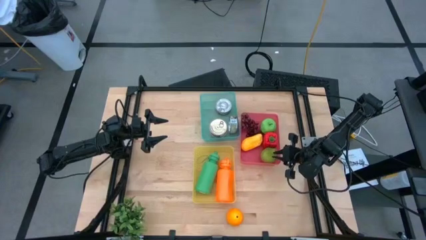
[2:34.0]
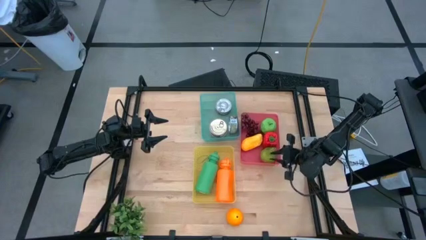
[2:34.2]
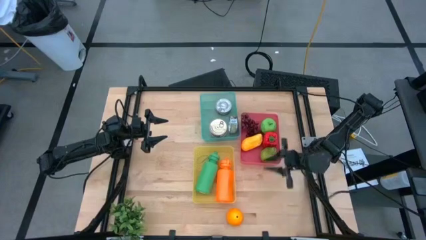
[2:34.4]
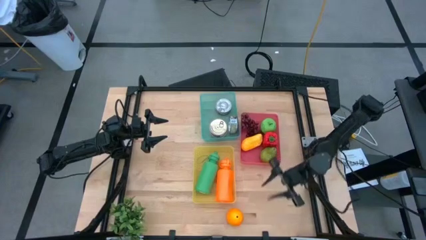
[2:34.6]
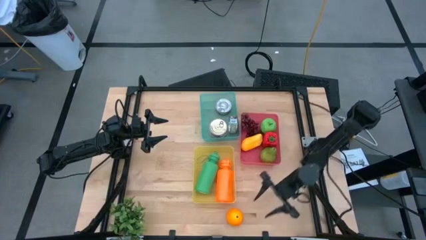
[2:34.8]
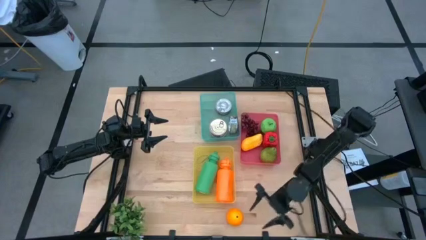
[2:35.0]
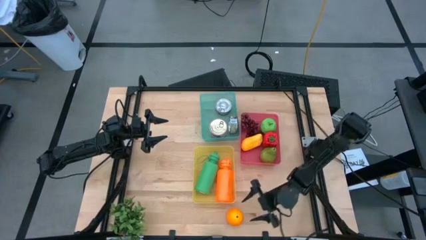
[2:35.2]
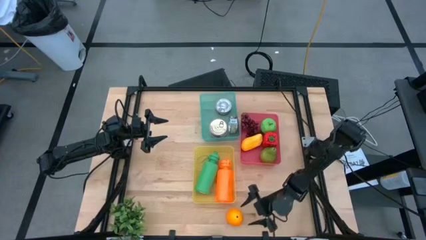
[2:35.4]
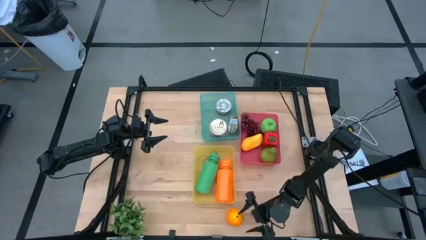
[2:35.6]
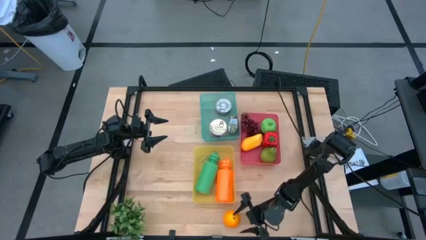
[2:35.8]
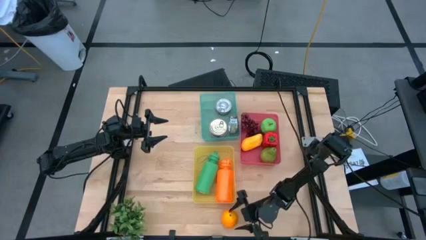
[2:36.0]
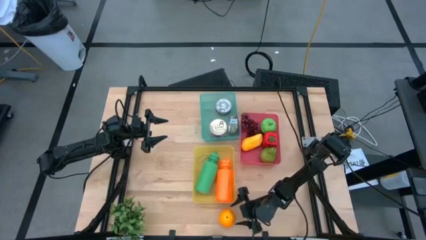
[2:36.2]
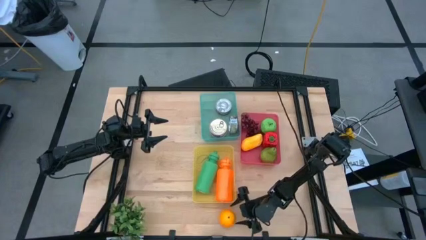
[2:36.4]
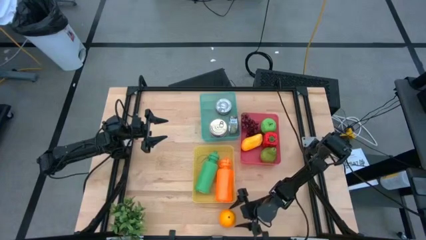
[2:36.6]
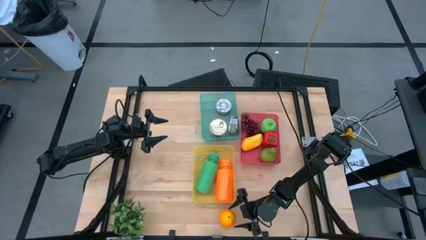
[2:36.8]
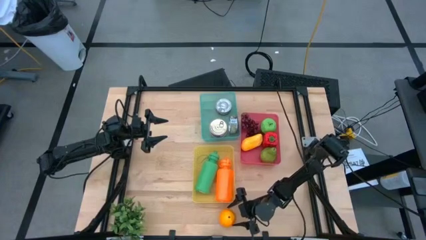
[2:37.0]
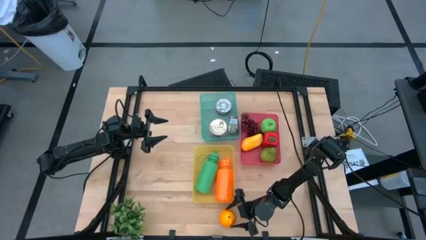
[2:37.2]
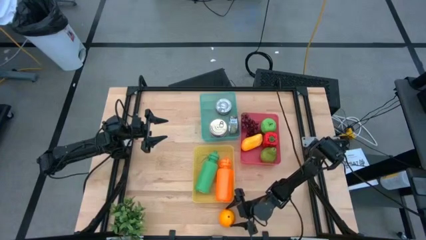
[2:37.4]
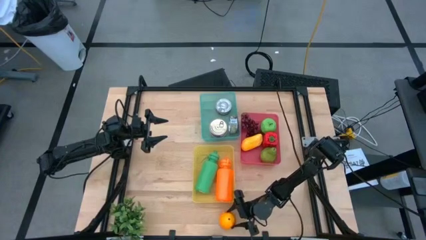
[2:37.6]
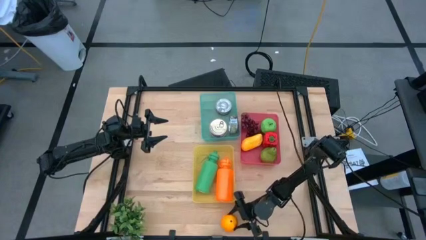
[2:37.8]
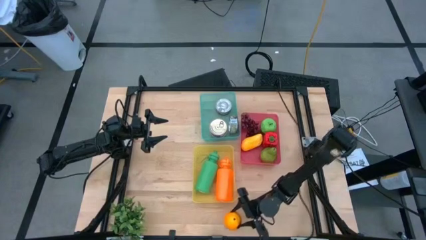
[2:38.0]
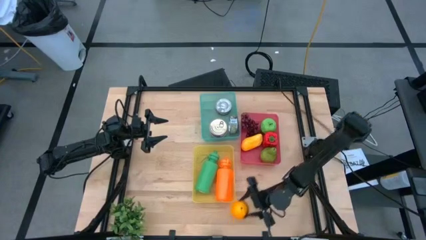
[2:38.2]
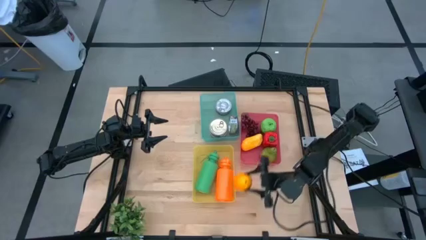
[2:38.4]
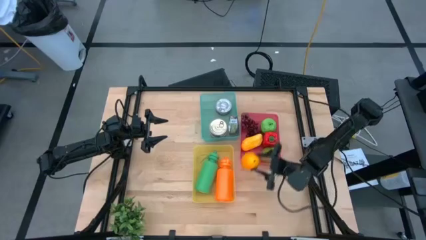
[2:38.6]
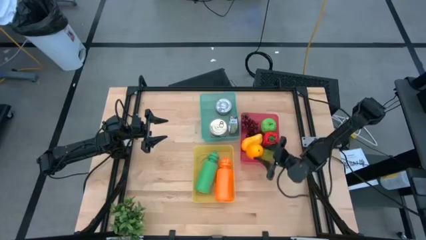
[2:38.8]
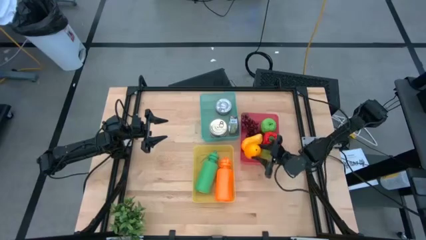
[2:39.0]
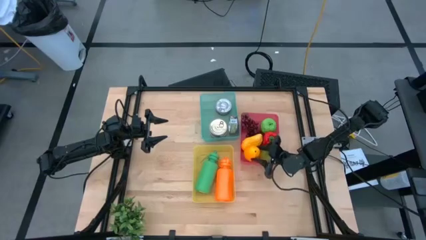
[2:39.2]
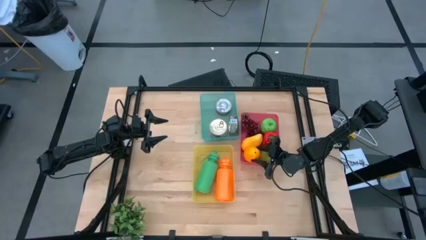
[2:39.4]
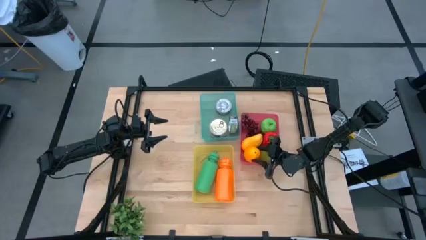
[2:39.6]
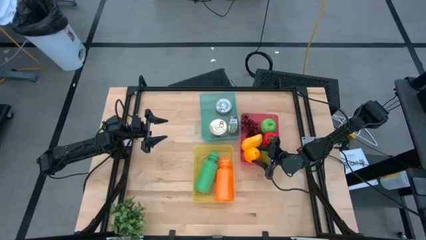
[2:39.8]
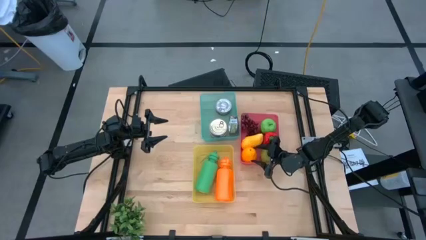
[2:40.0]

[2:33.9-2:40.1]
Task: Pick & Place Food Item
Put the orange into the red bin

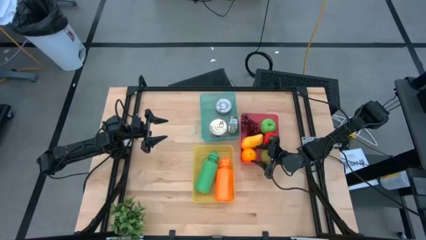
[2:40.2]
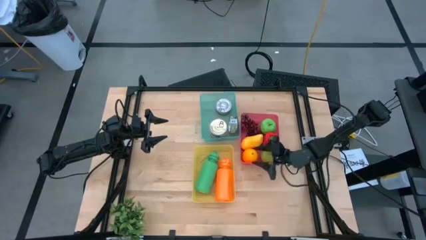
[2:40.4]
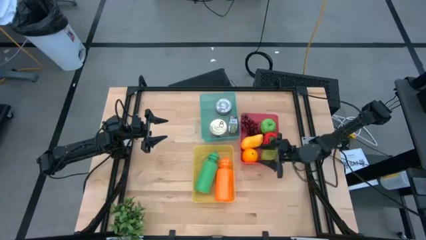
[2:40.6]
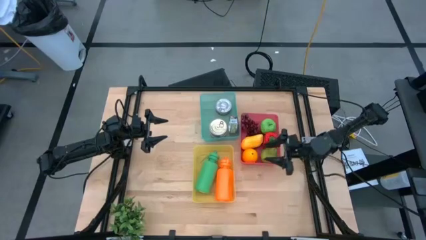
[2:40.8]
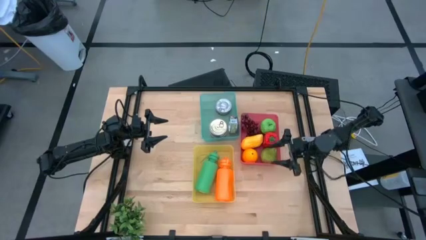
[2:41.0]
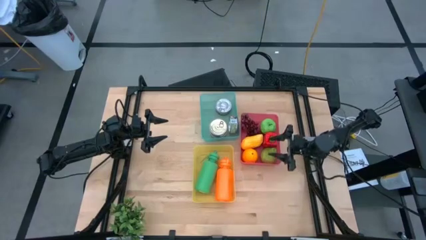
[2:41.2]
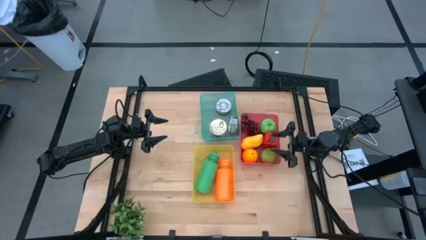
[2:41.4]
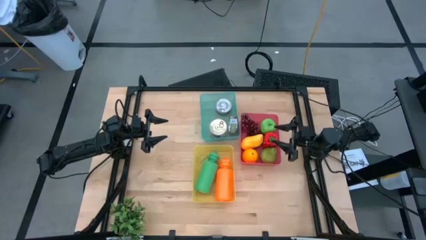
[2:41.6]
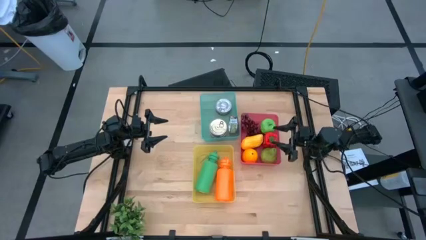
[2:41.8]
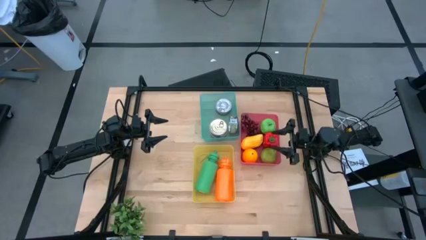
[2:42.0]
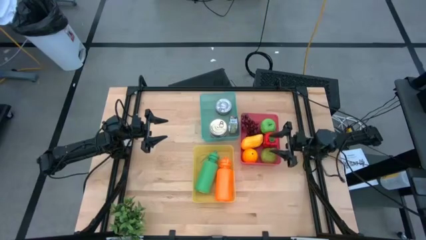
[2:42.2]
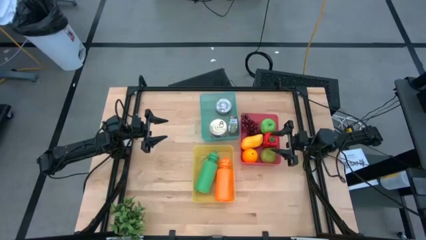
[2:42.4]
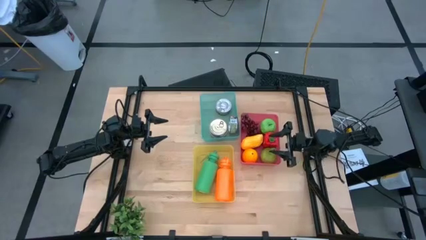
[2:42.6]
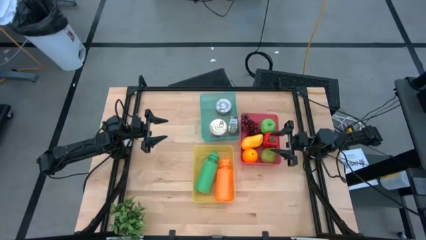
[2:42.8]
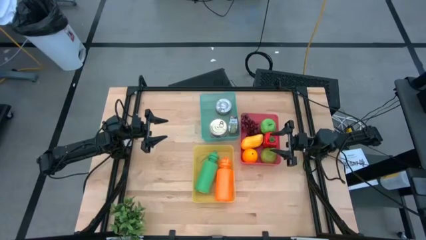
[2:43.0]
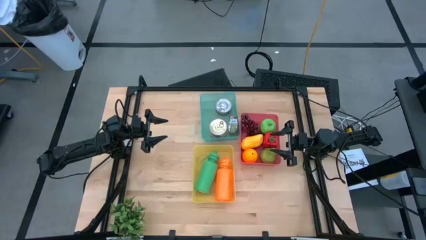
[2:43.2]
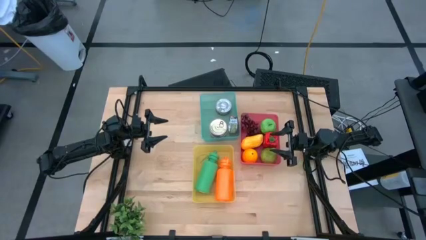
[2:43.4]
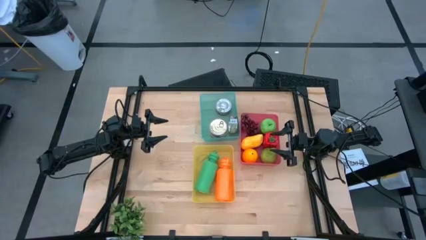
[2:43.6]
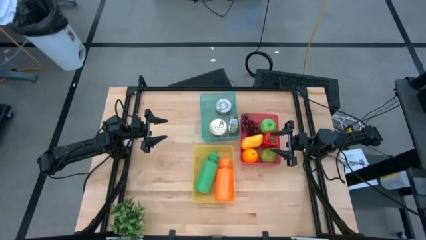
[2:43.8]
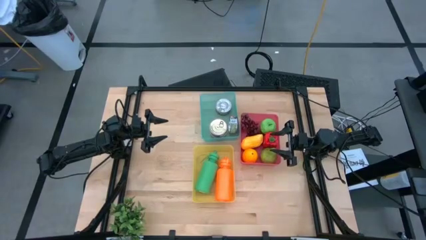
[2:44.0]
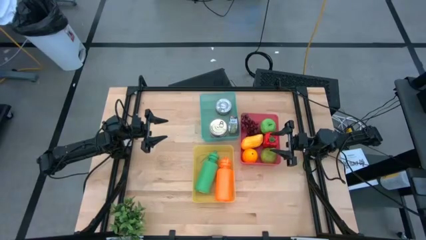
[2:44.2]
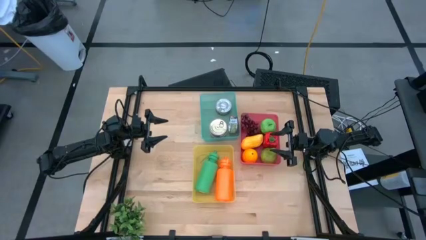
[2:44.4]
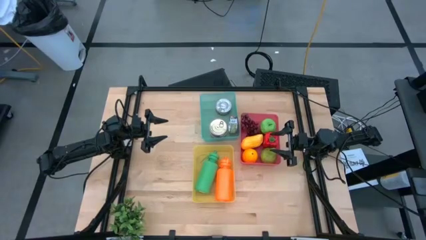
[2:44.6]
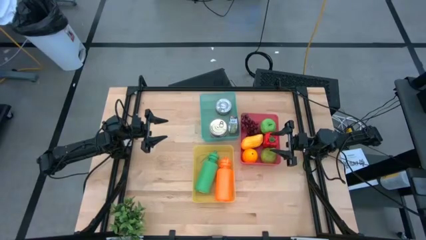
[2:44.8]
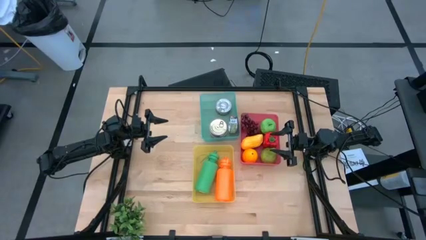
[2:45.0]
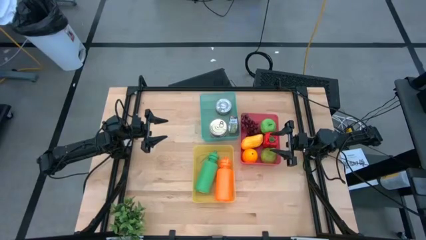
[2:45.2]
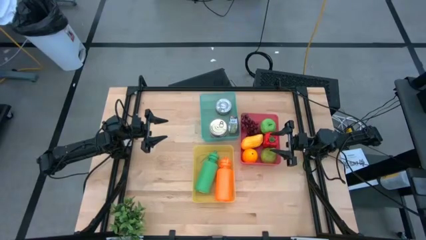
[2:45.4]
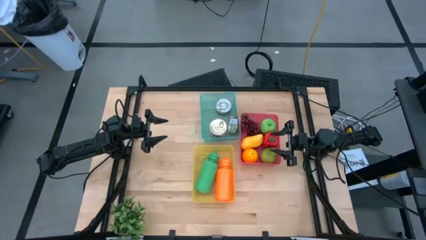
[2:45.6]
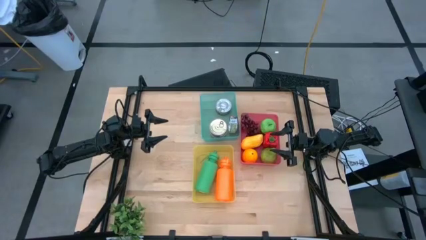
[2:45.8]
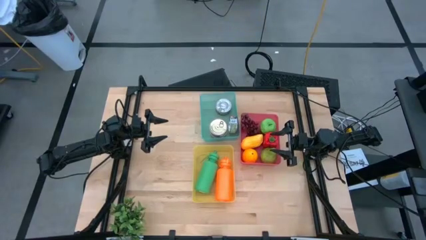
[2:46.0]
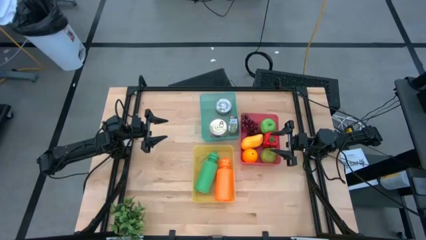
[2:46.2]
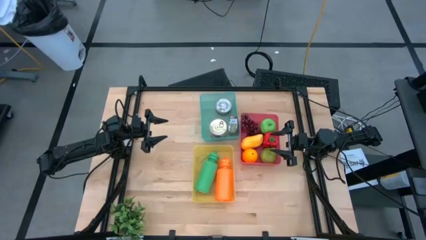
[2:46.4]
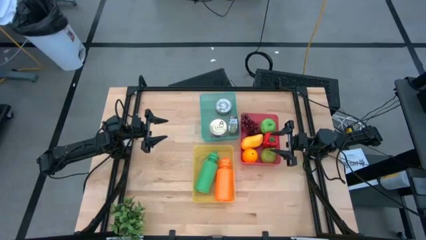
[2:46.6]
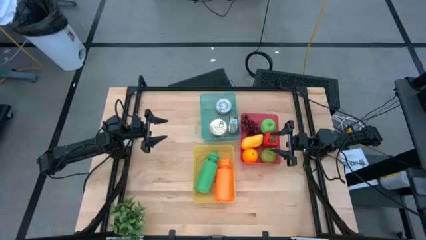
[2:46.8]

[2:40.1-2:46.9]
Return to Home Position

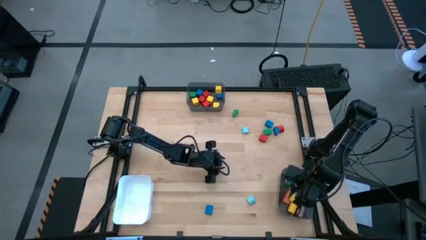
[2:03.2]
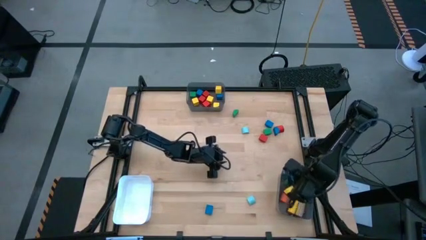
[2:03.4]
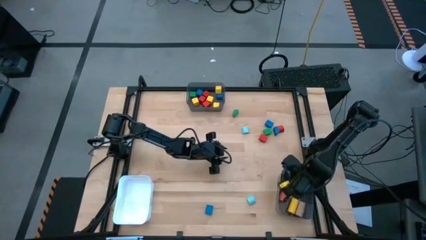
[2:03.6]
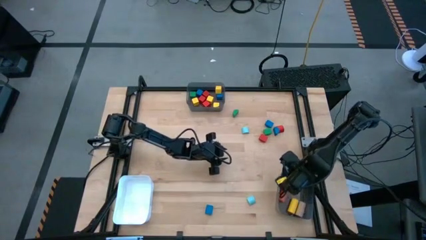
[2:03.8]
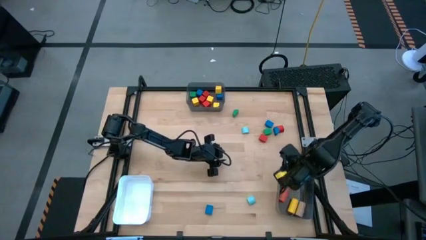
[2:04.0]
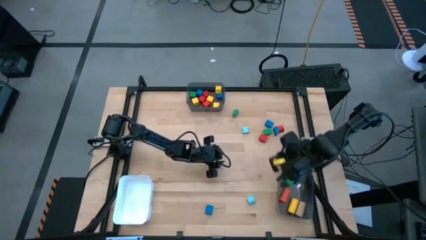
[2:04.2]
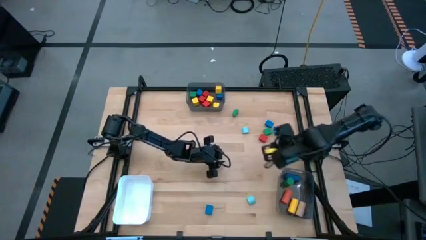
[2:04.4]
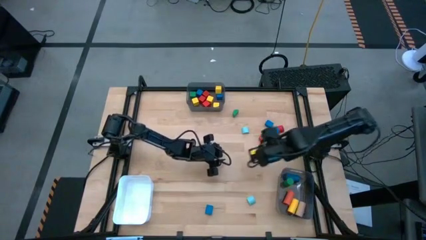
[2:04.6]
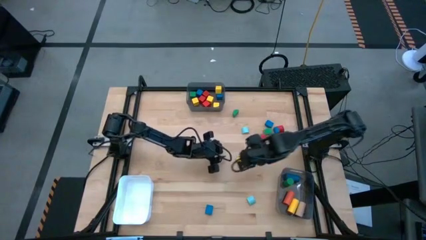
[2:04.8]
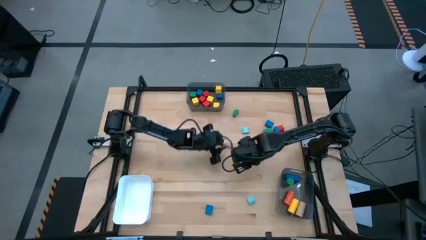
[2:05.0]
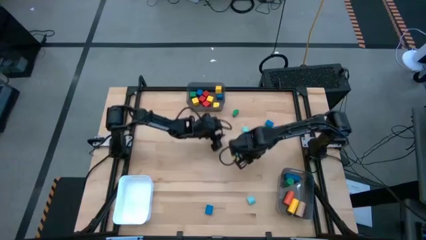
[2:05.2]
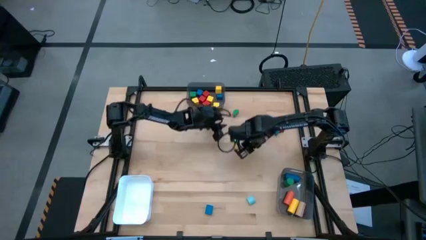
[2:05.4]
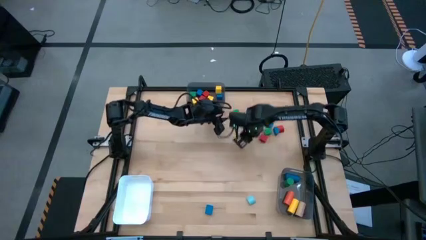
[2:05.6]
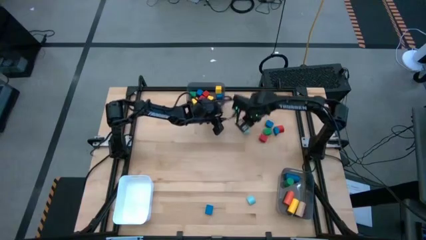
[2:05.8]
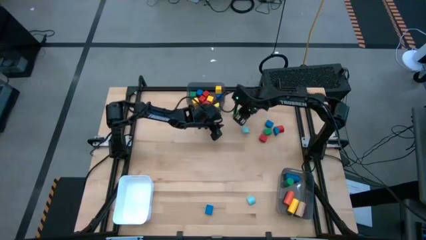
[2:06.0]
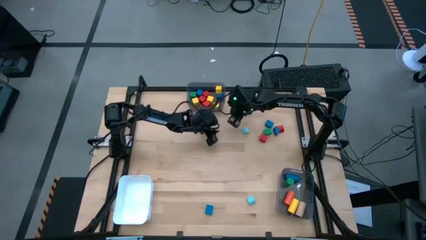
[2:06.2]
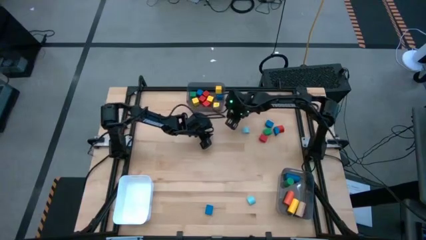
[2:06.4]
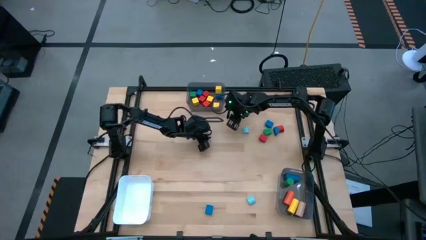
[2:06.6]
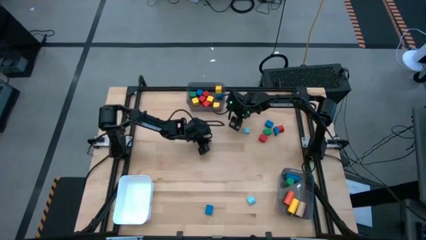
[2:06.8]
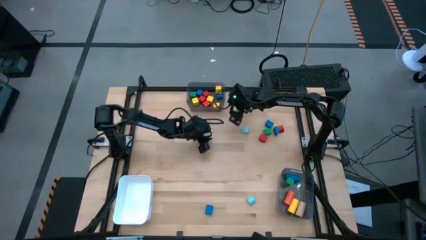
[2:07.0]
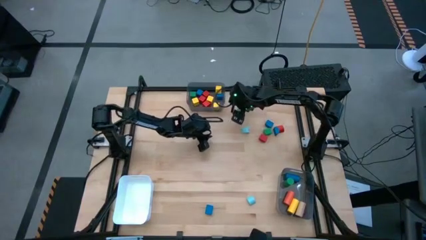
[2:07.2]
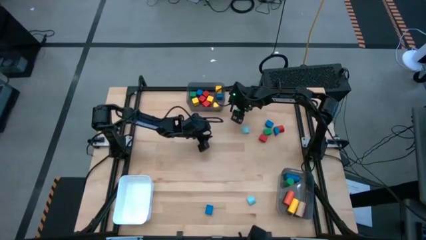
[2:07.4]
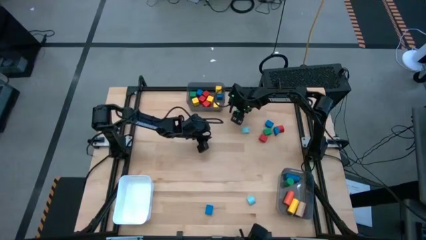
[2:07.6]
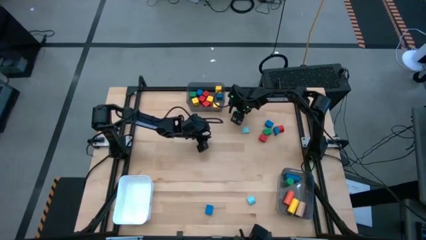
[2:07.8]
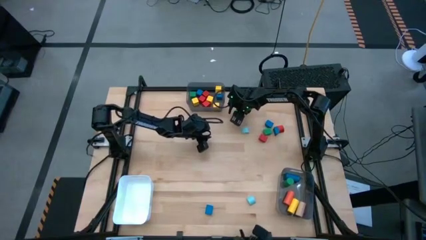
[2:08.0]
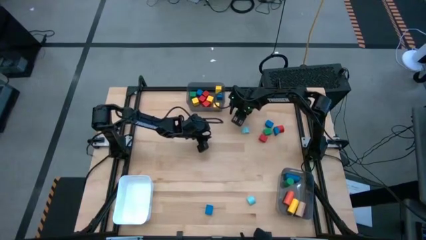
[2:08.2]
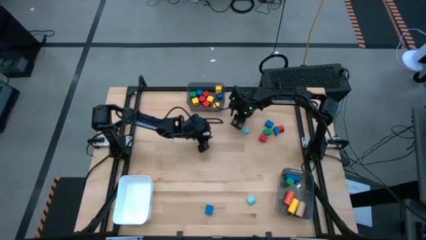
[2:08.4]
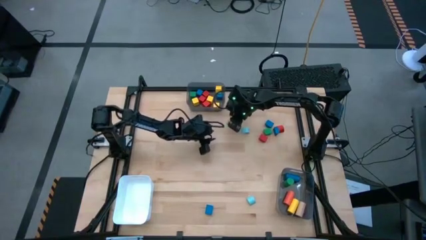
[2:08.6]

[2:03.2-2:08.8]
Task: Sort blocks by size
Put the green half circle block into the white bin
